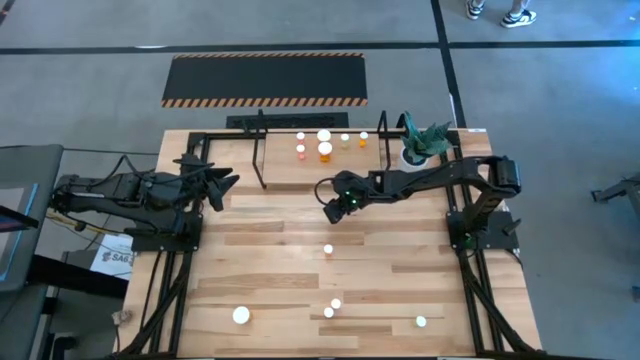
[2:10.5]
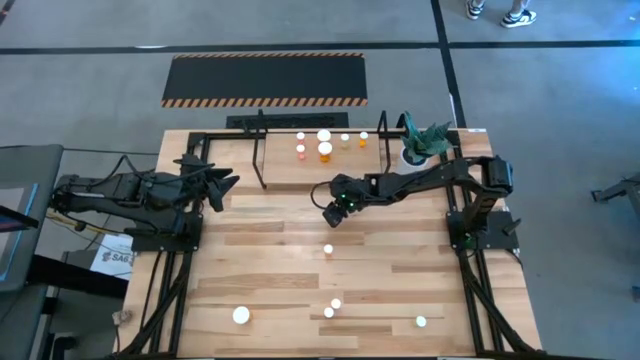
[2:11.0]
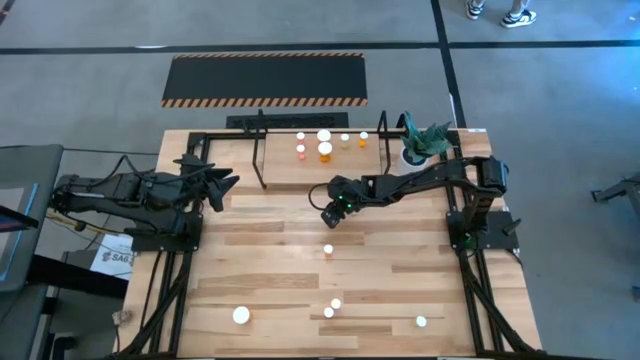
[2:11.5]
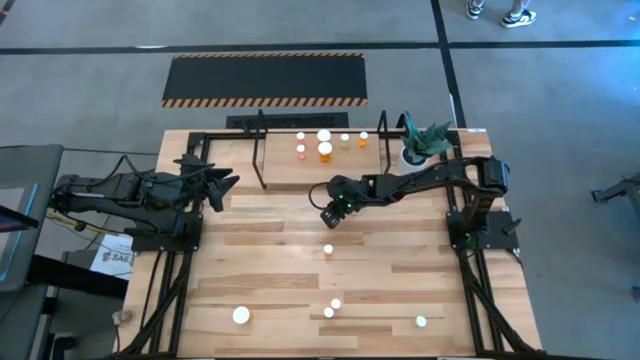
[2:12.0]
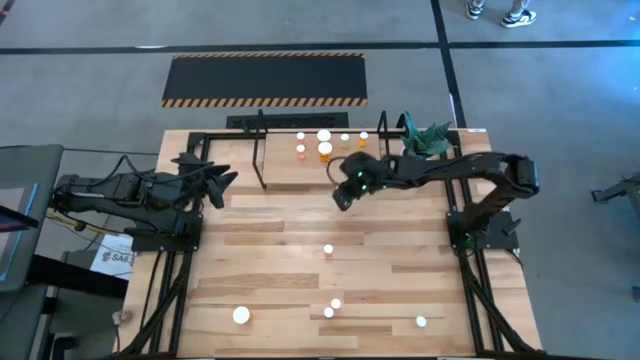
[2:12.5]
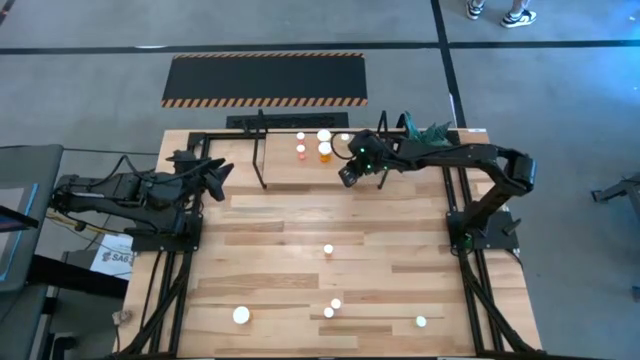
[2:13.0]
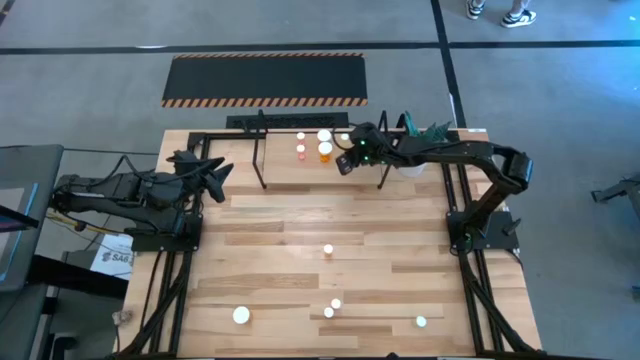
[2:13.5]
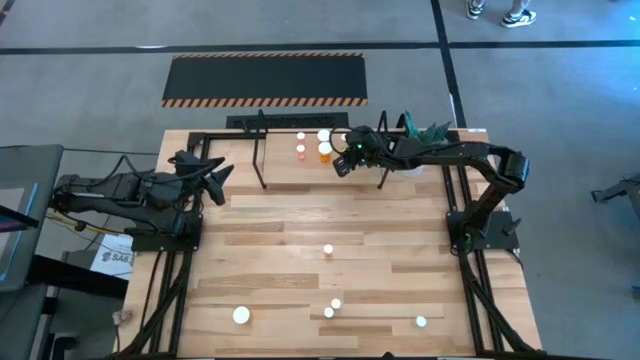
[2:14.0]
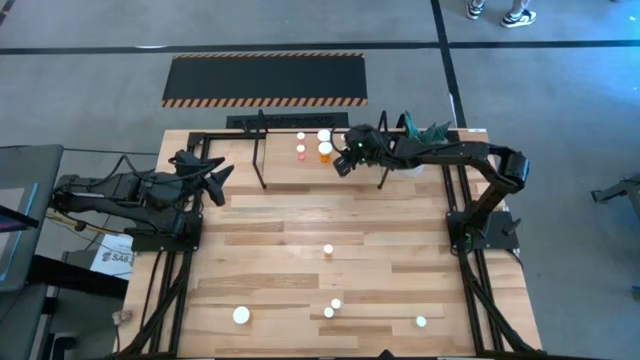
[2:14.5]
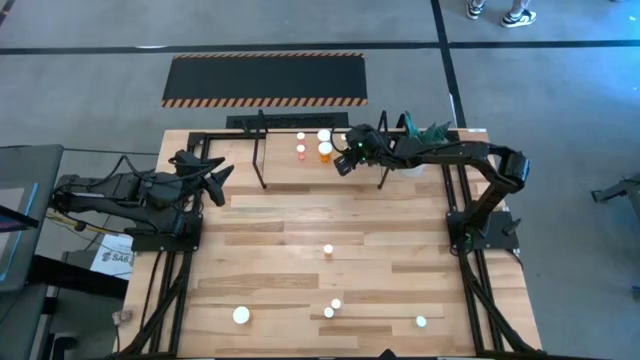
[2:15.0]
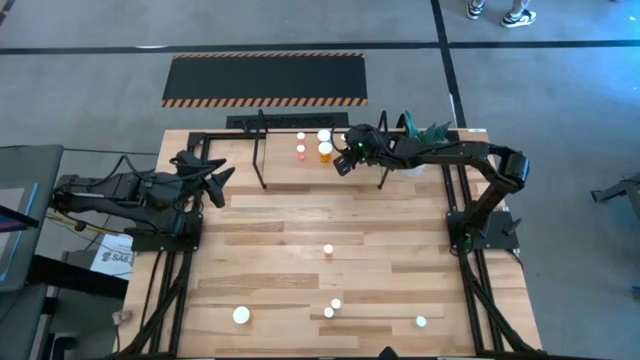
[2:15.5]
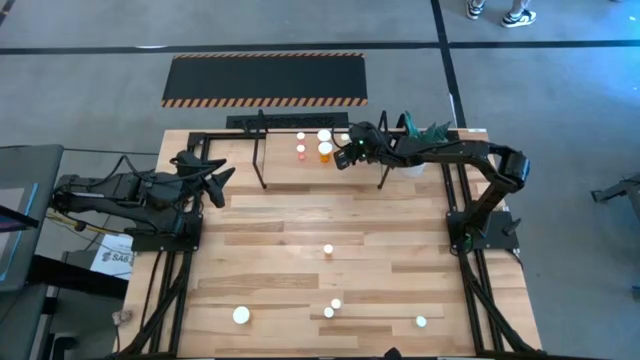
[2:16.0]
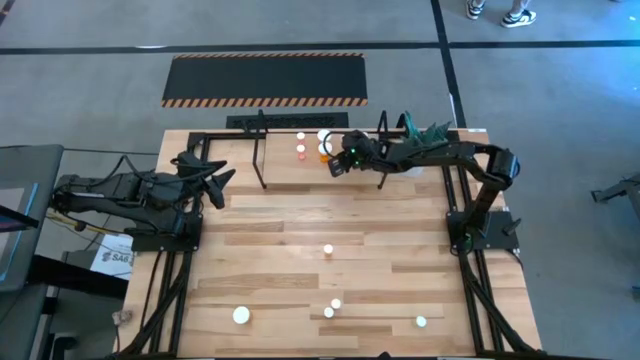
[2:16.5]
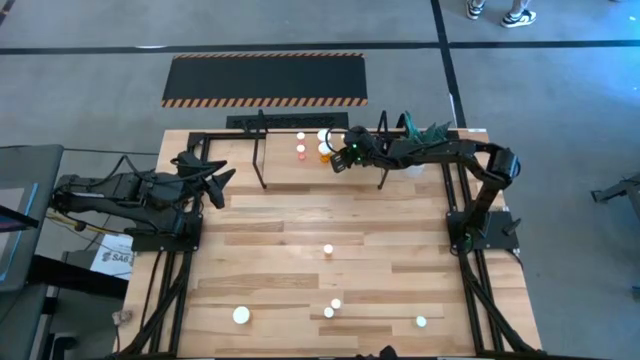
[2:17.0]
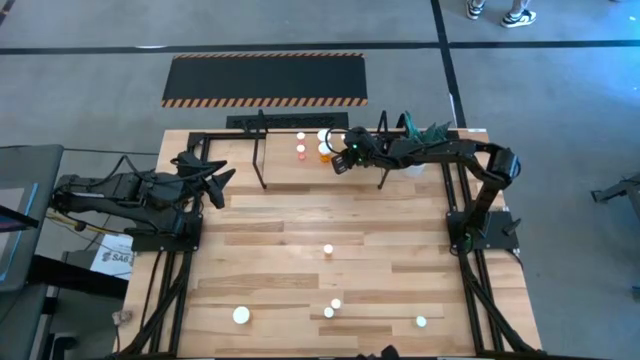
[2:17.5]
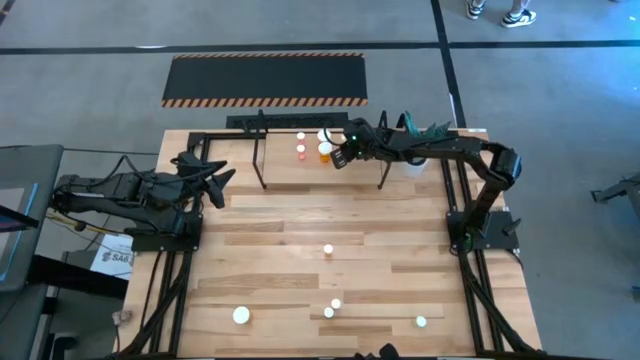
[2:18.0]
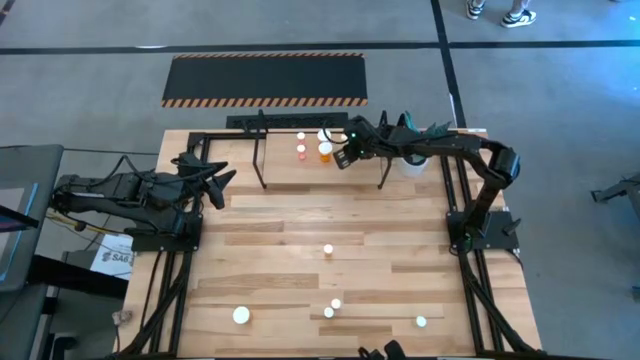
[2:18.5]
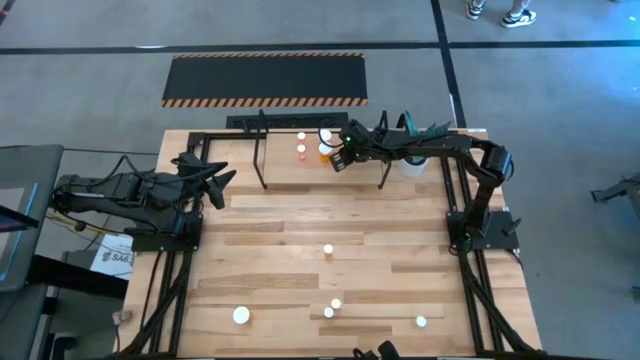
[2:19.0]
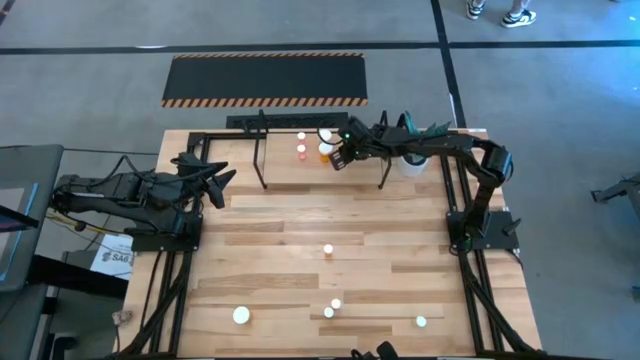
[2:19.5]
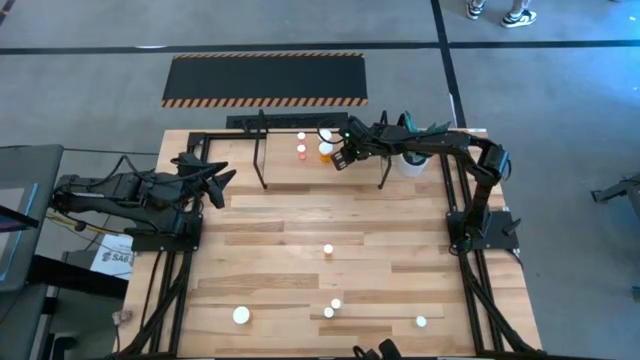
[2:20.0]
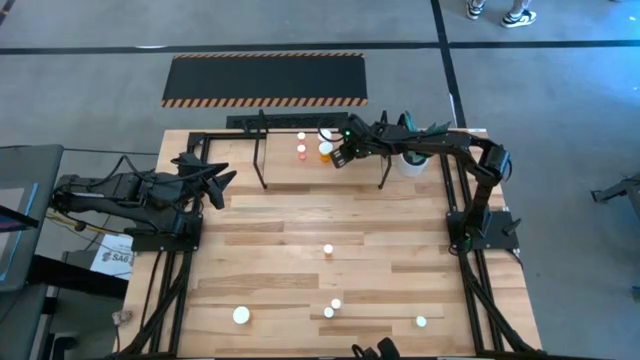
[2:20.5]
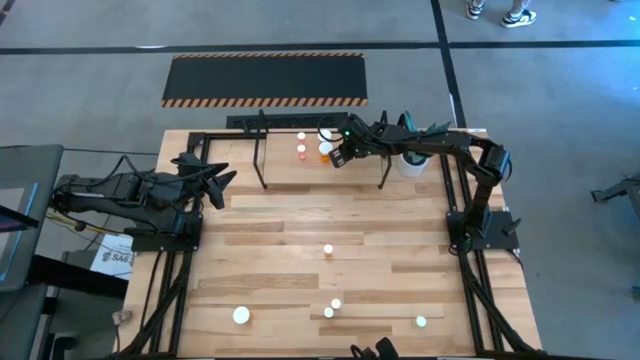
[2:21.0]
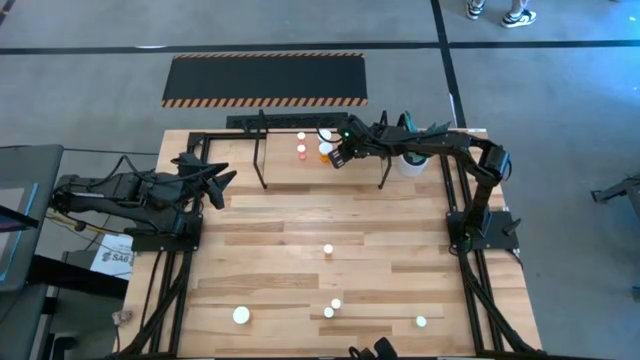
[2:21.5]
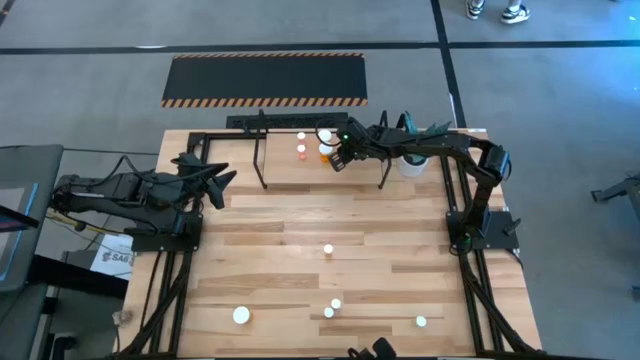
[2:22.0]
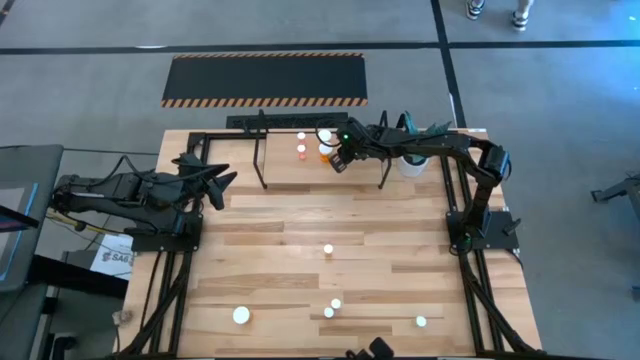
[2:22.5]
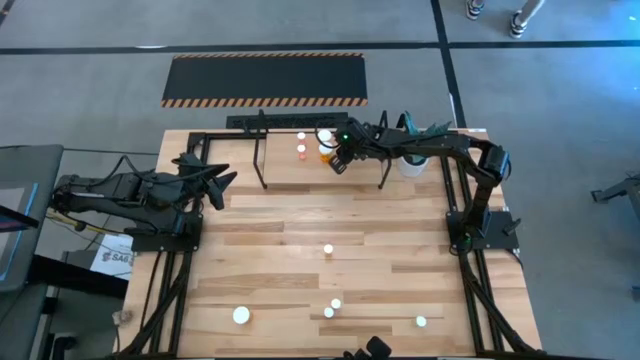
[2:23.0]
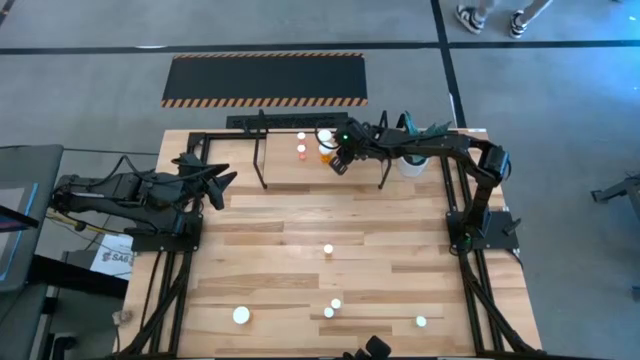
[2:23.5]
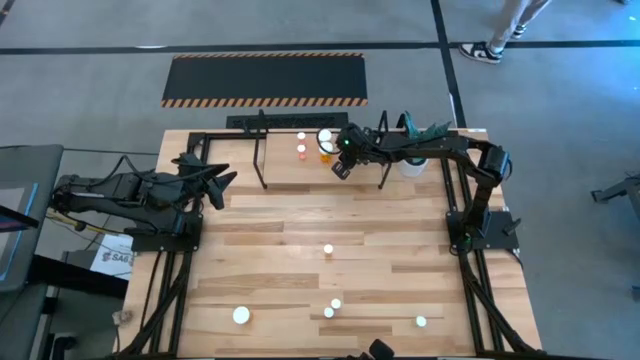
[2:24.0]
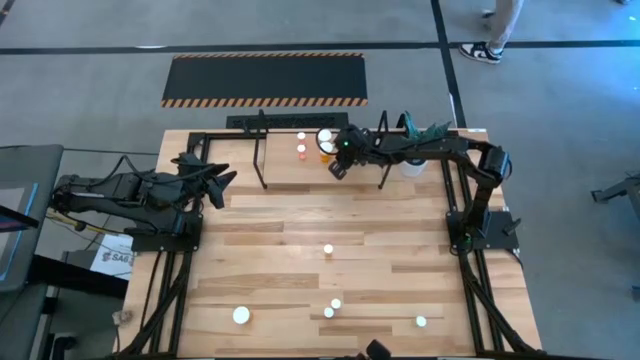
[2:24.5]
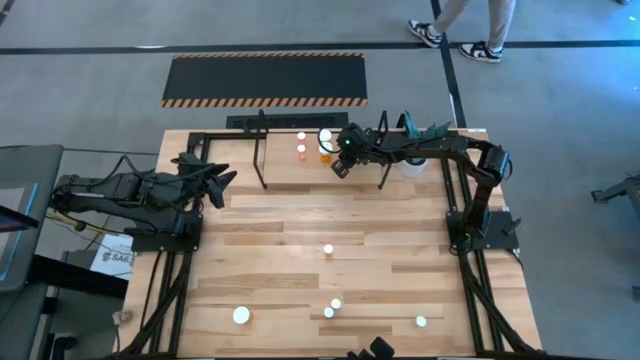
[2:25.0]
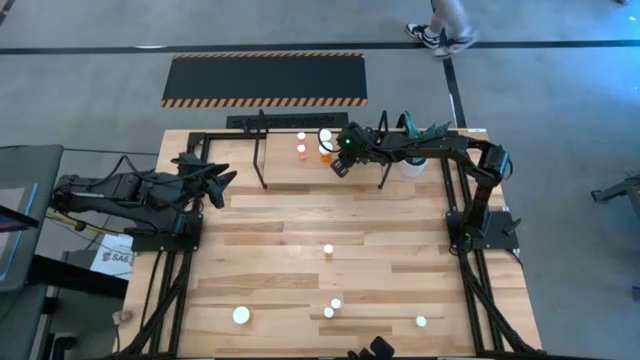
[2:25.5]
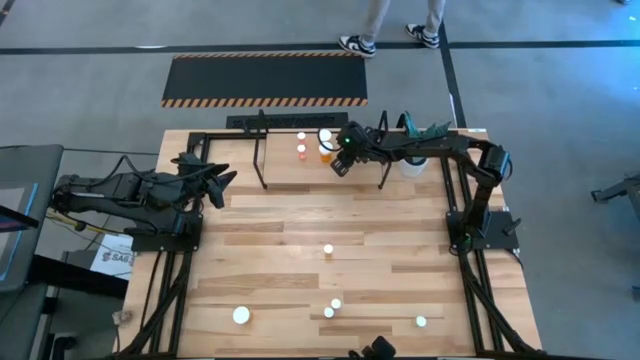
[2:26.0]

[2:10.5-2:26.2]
Task: Pick and place medicine bottles onto shelf by color
Put the left yellow pill bottle on the shelf aligned with the other yellow pill bottle

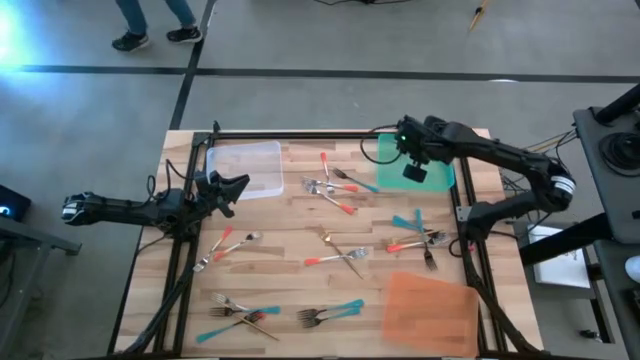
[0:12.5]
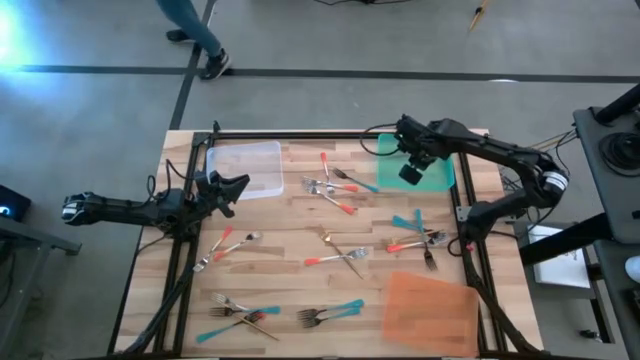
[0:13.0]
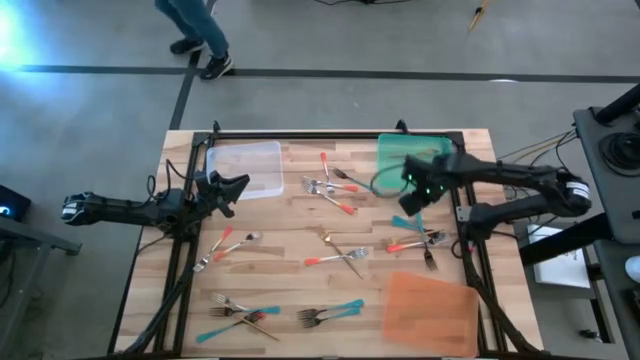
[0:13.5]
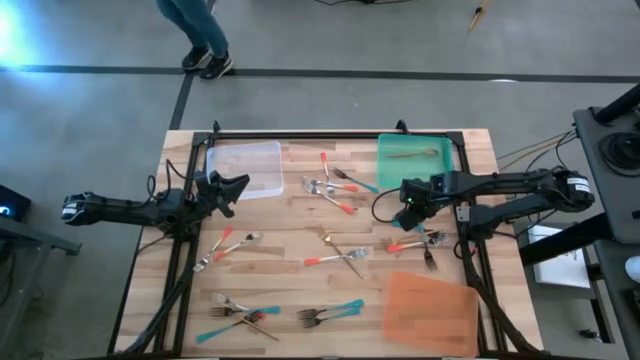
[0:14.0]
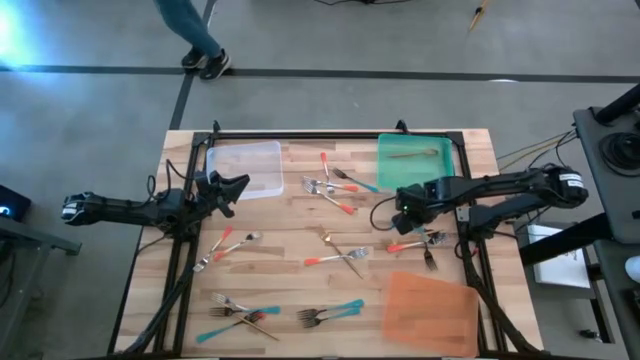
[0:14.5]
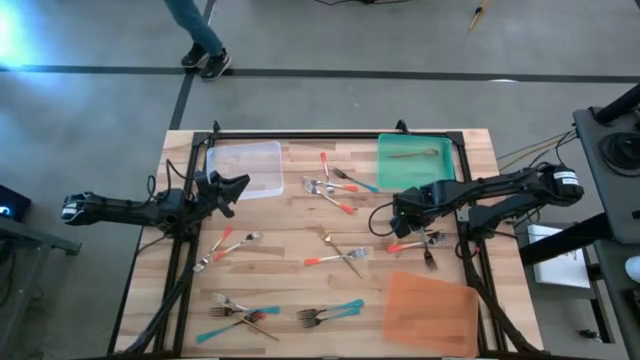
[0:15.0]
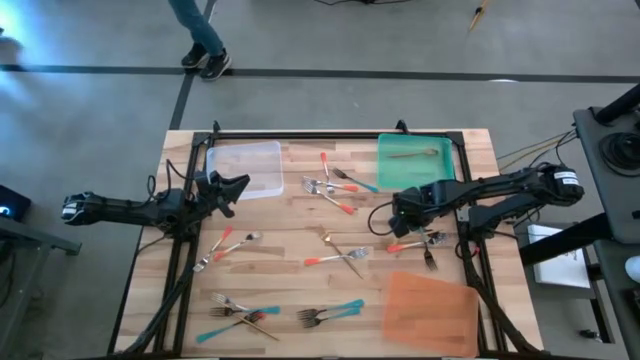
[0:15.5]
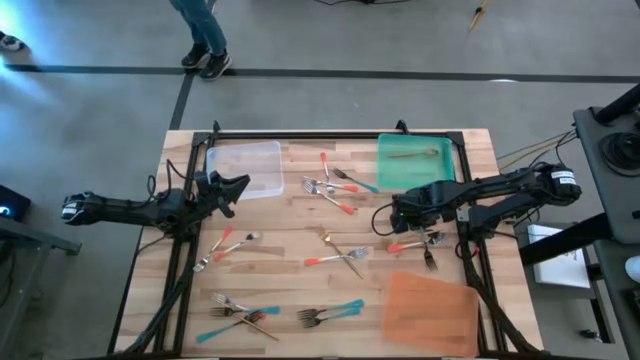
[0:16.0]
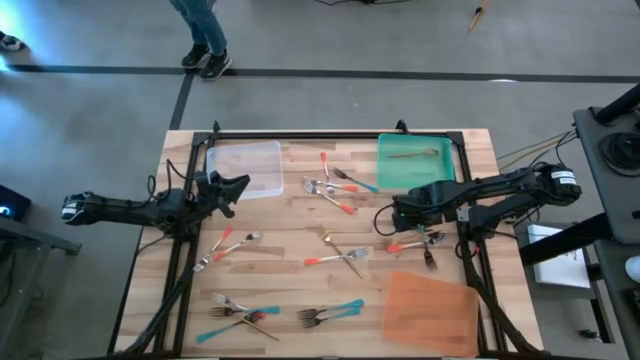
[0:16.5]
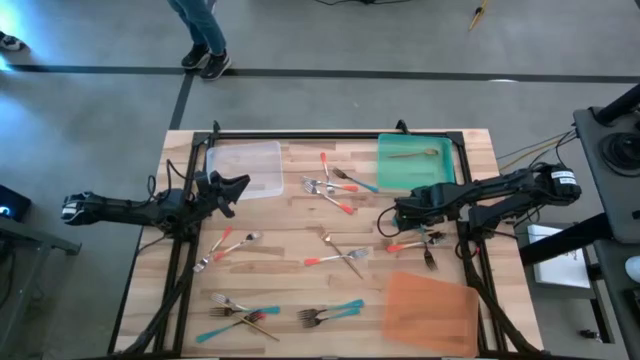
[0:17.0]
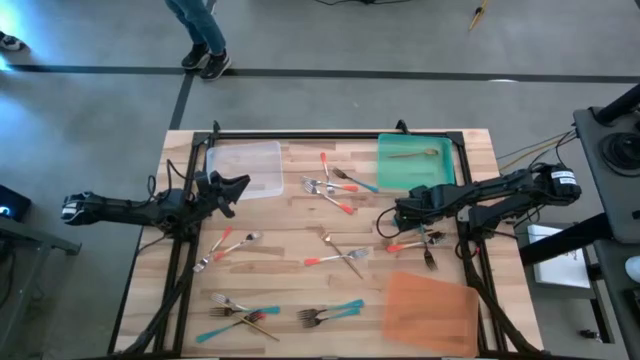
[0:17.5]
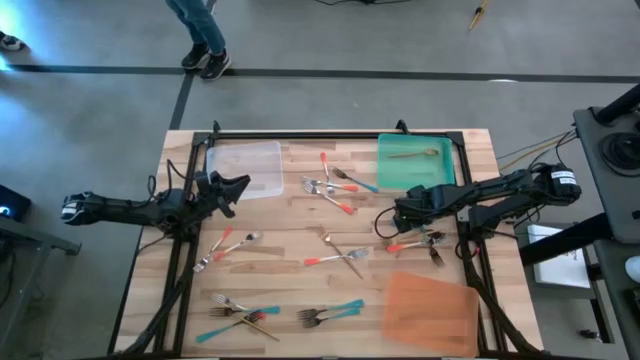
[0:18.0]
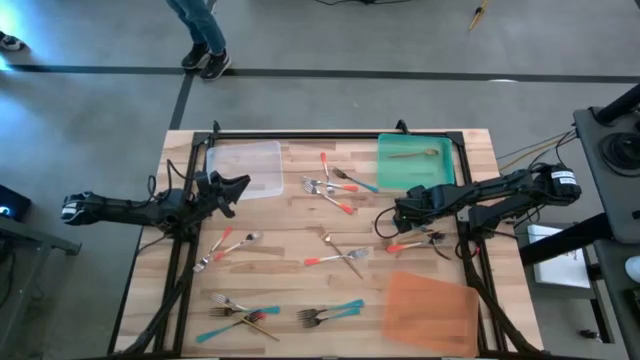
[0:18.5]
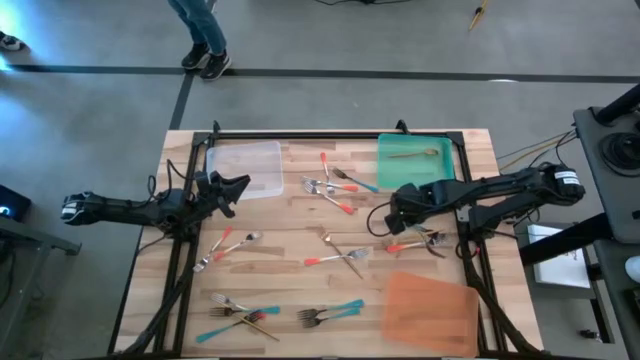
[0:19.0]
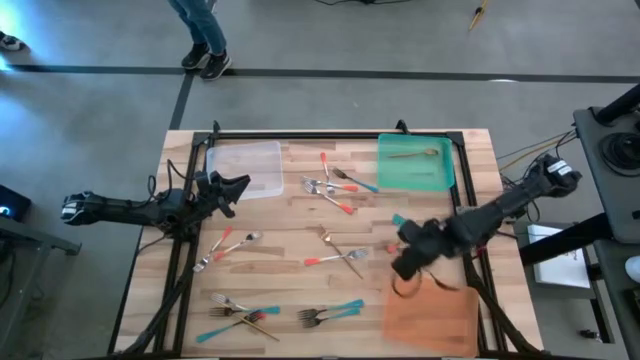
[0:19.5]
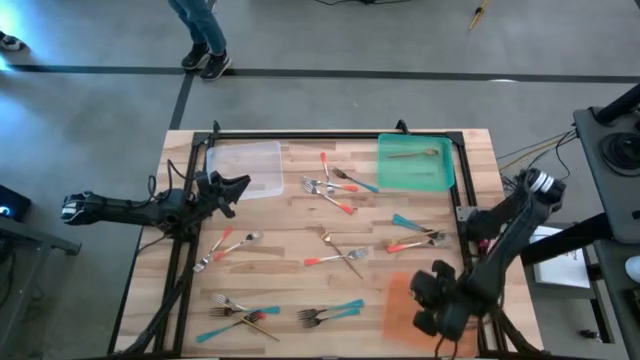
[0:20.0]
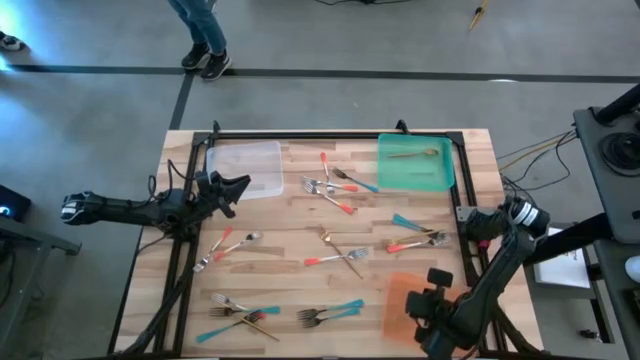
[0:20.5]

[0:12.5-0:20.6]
Task: Sort silverware by color (type)
Put the blue fork into the orange bin
